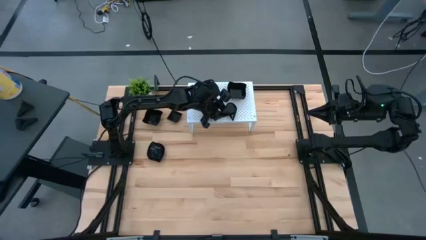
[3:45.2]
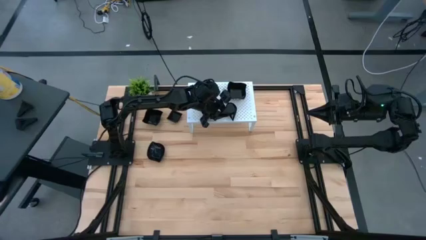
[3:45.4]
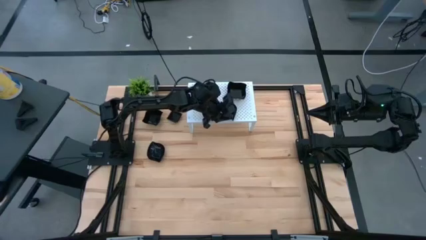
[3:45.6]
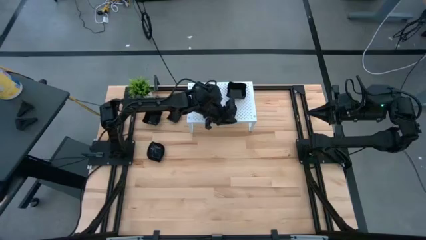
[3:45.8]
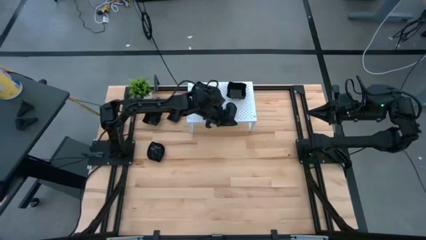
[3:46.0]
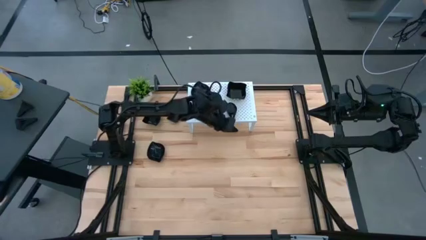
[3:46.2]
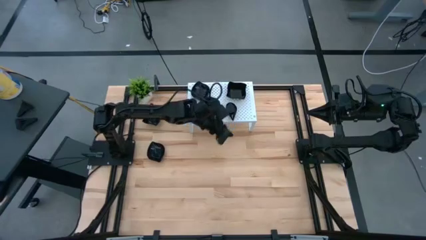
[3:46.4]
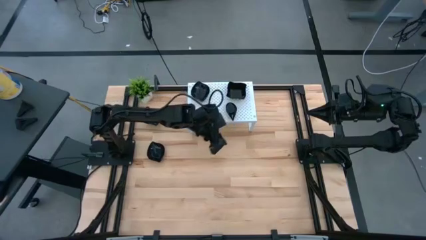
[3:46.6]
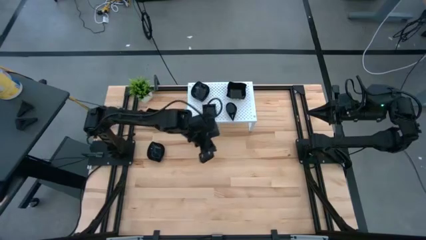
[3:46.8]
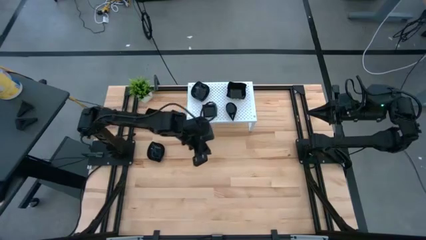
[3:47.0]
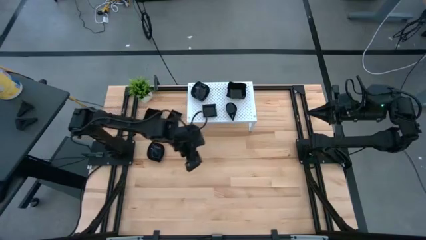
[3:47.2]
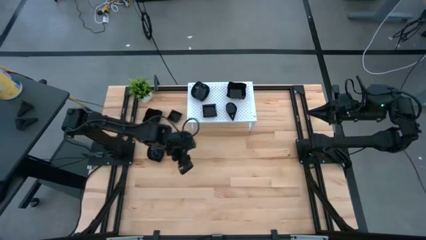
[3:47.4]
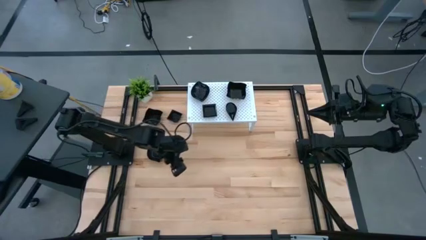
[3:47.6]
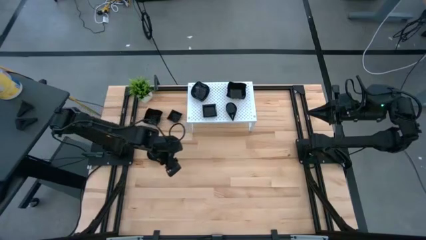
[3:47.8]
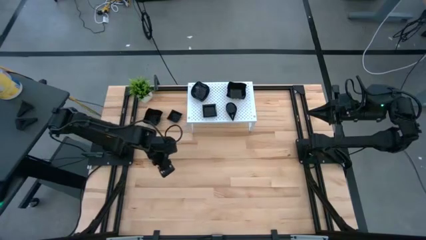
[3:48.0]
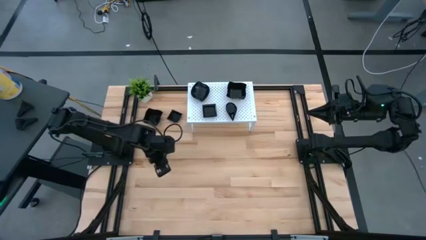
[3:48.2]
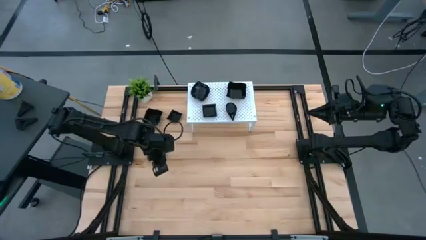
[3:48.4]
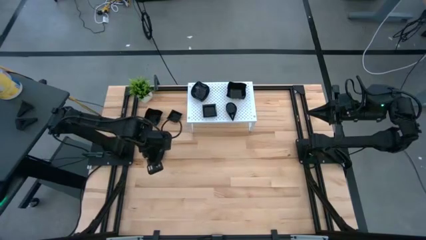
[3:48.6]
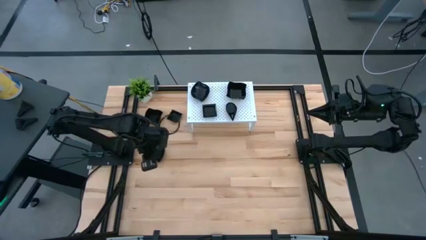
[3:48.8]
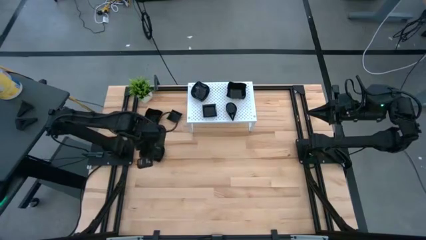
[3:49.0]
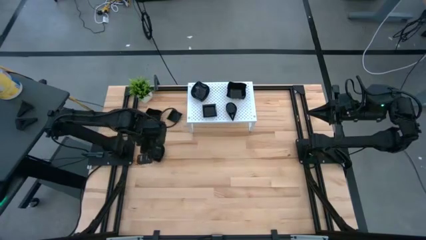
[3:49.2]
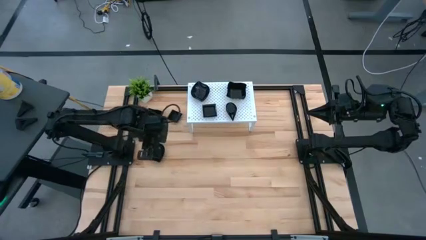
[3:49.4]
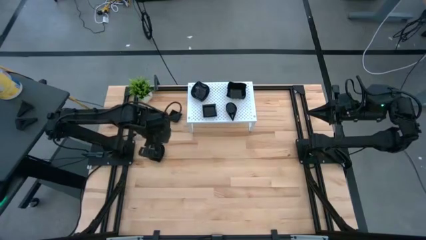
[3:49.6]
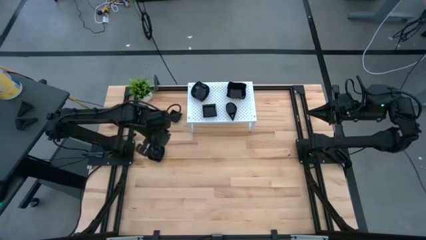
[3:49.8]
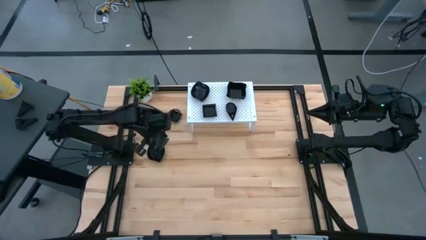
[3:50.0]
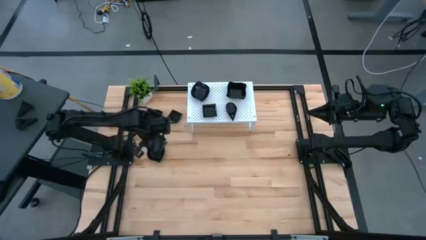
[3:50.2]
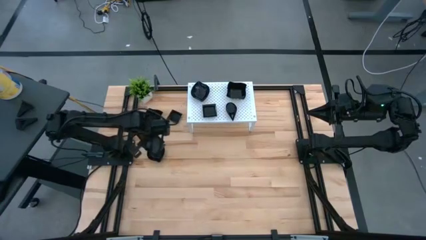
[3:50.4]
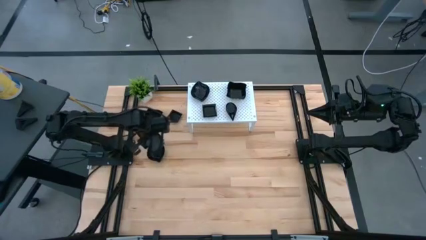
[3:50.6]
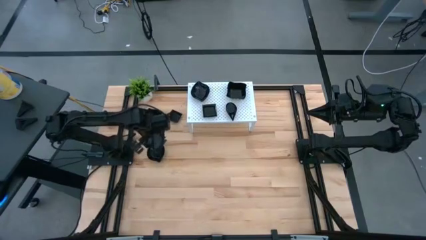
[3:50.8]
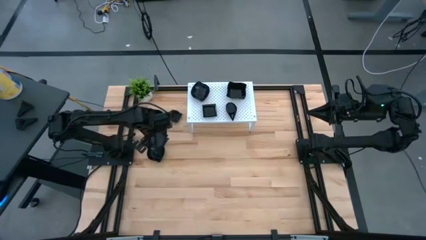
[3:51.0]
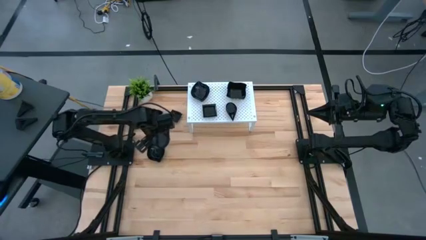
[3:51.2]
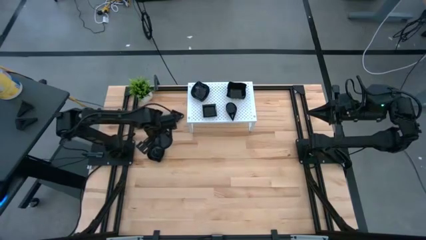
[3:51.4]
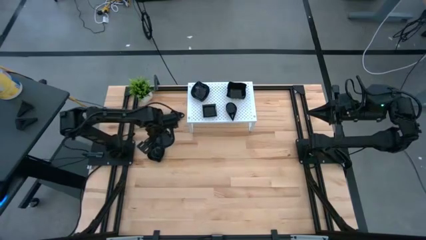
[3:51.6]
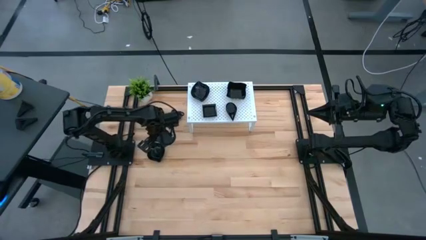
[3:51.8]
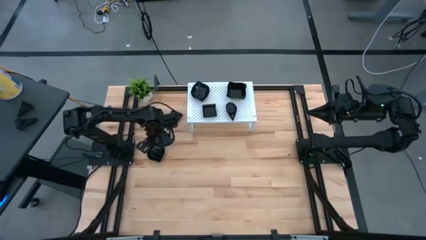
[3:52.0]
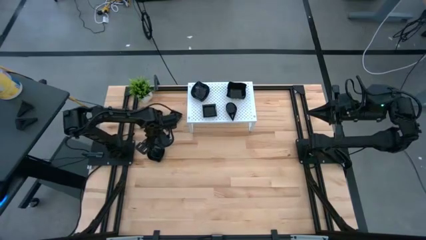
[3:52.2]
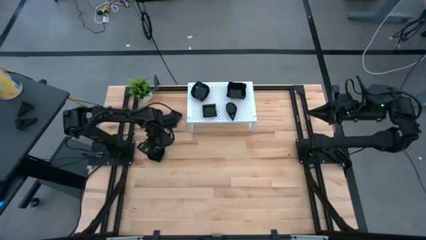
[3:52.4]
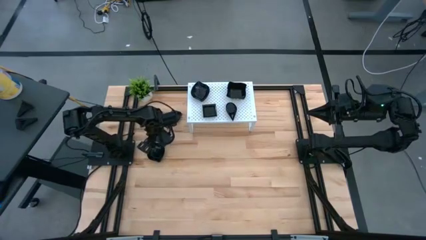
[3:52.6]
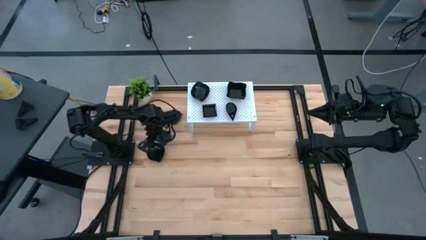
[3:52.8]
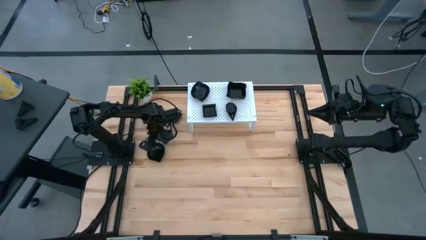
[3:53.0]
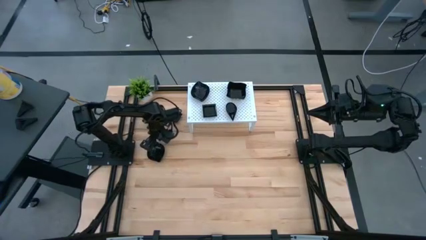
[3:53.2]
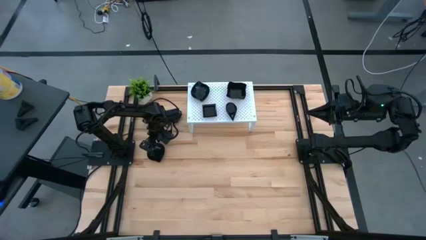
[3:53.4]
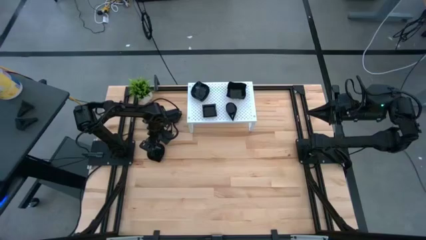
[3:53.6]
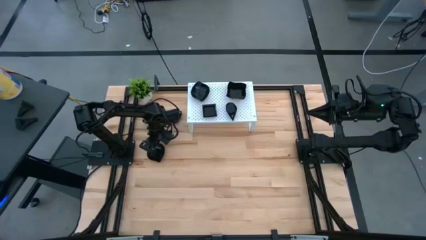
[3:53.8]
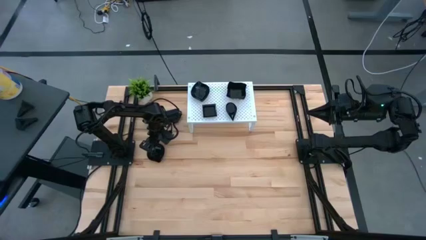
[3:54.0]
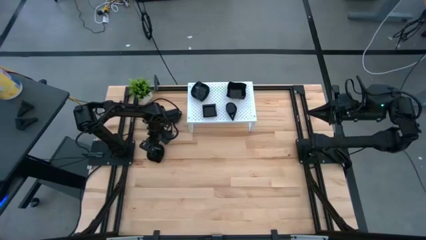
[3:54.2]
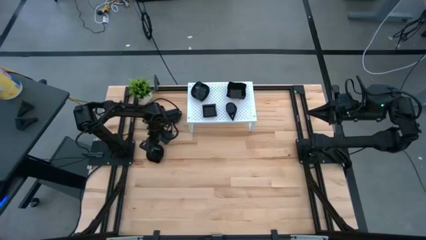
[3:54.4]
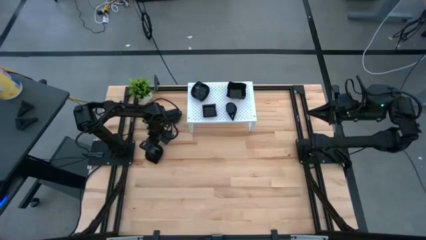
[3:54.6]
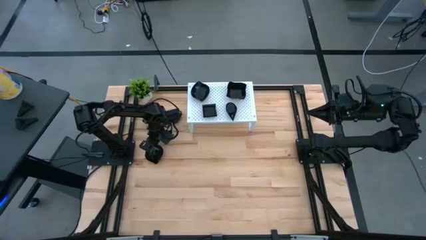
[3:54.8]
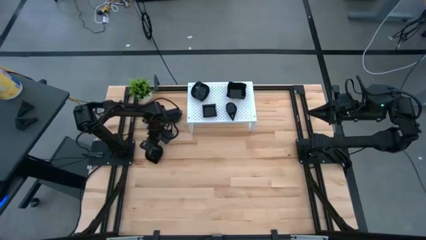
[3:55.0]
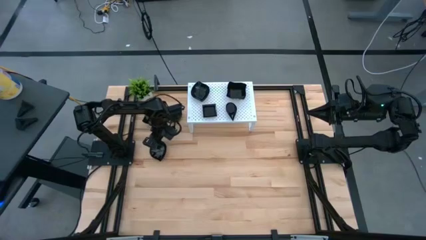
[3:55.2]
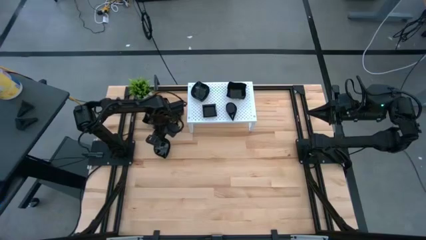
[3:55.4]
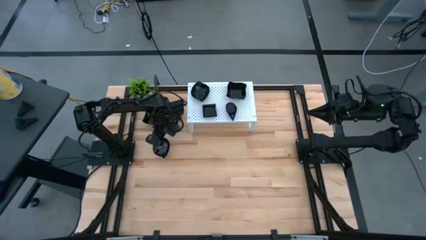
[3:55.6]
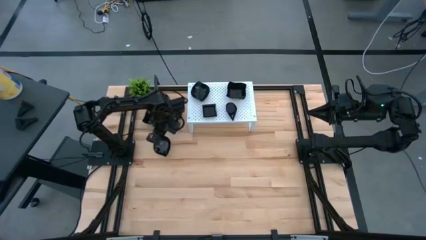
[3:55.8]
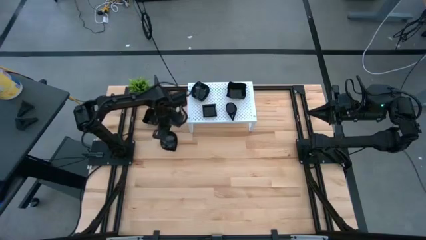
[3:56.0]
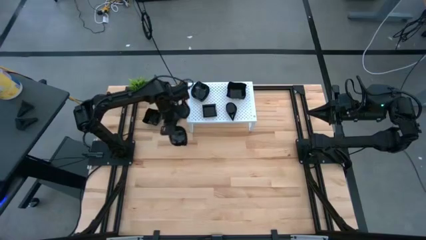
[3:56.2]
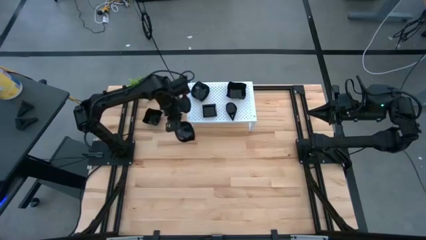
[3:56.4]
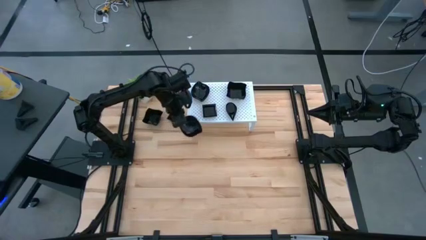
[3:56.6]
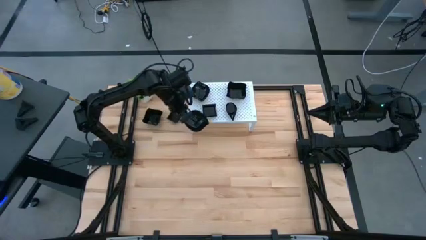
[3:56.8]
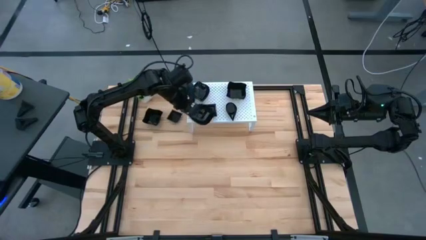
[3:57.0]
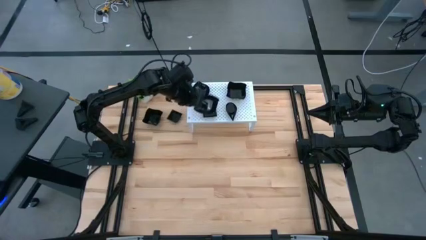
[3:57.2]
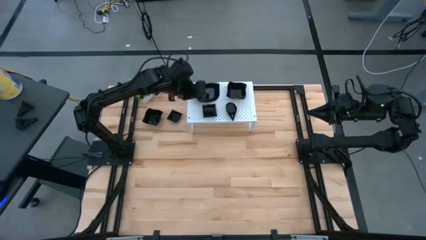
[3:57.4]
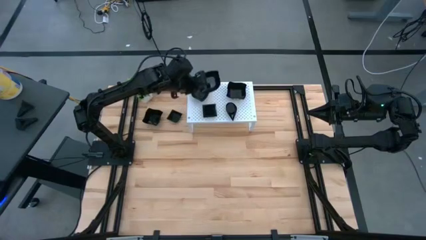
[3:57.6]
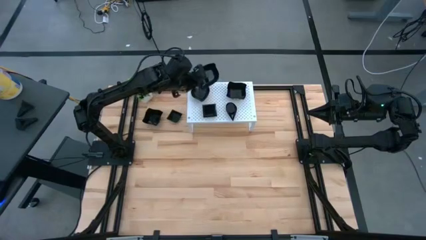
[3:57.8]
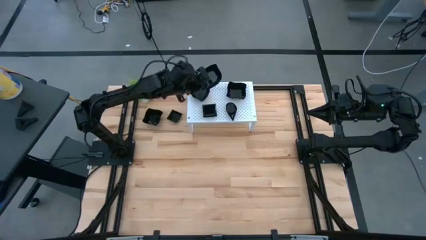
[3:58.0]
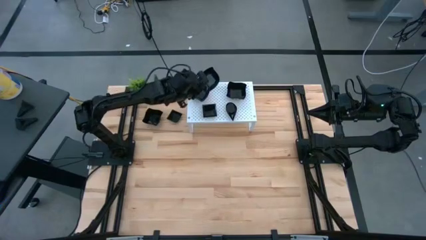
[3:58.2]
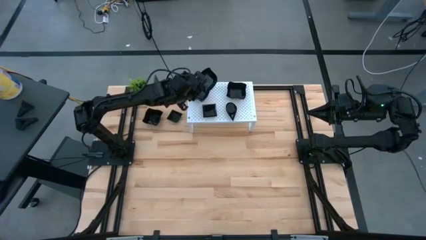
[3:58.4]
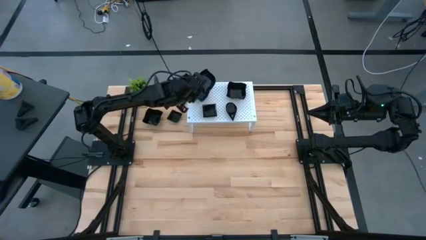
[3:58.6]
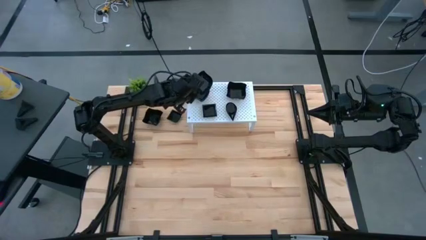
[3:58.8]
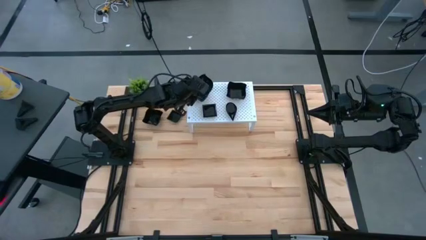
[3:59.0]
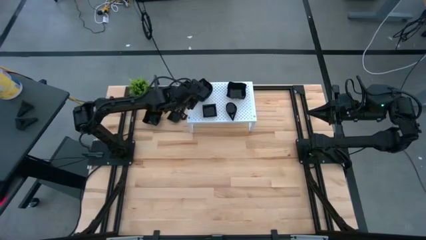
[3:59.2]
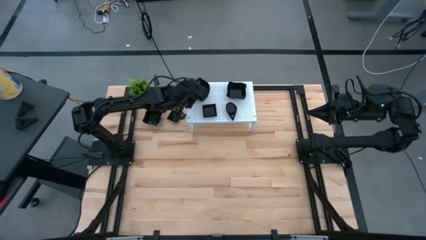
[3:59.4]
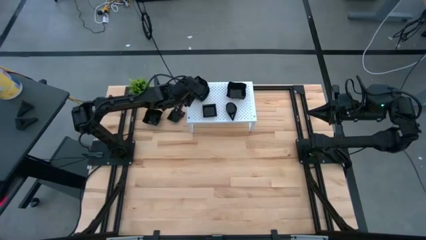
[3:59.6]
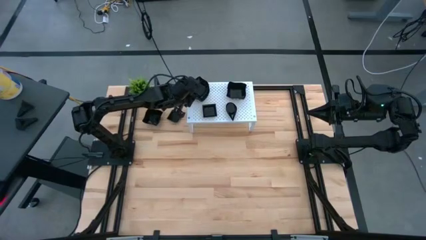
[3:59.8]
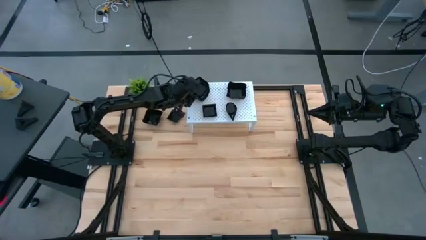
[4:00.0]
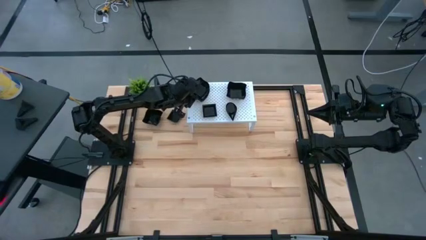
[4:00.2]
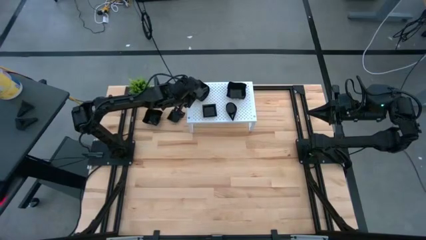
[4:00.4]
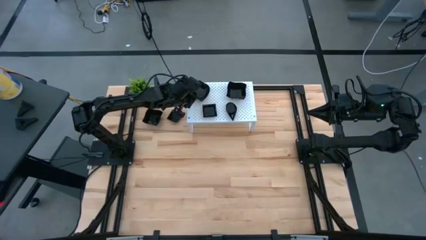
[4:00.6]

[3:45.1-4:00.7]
Task: Pick & Place Mini shaped plates
Stack the leaf-shaped plate on top of the leaf-shaped plate on the shelf
